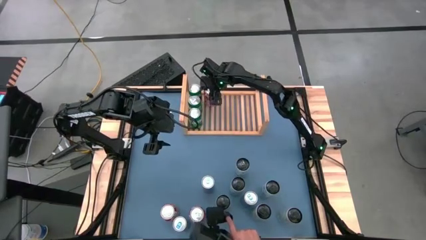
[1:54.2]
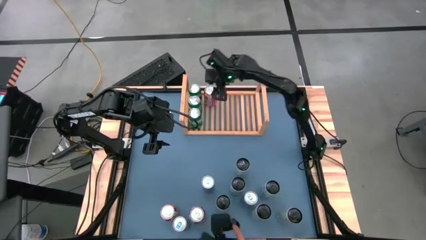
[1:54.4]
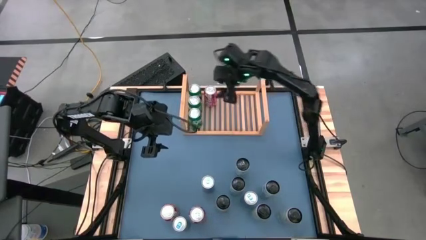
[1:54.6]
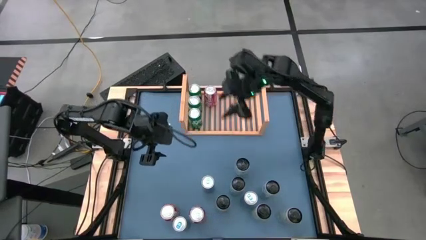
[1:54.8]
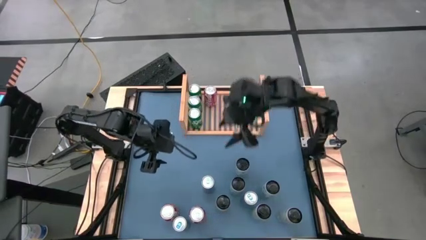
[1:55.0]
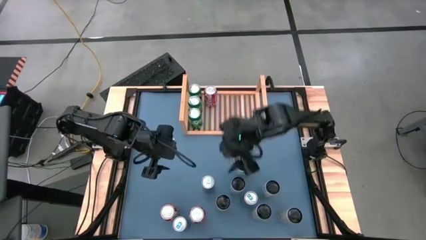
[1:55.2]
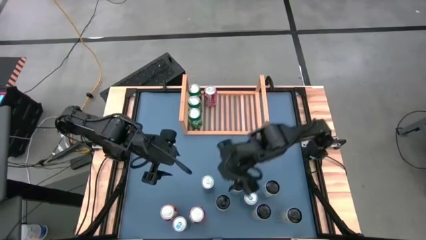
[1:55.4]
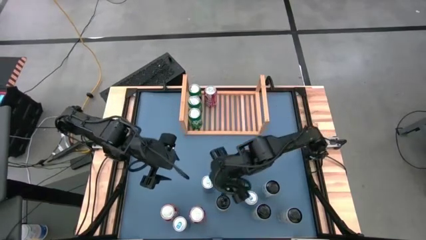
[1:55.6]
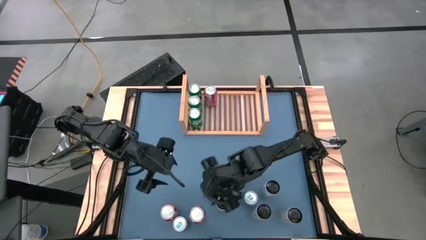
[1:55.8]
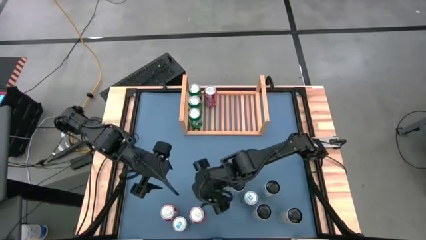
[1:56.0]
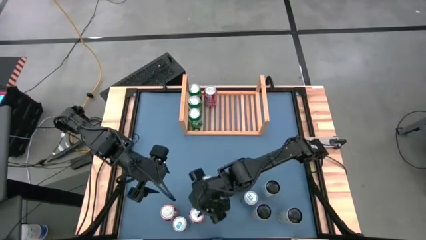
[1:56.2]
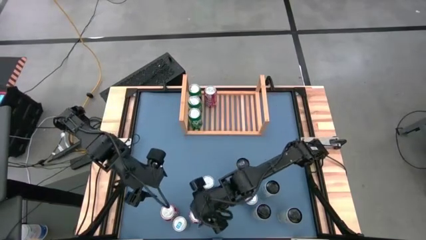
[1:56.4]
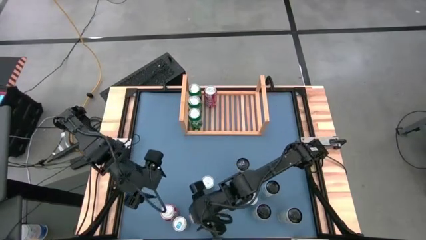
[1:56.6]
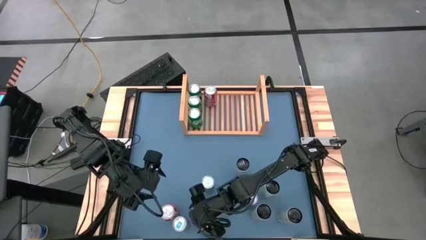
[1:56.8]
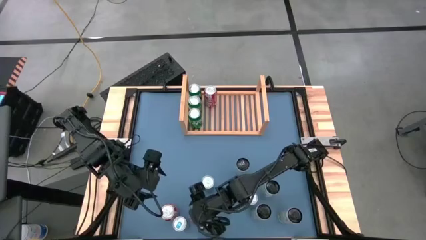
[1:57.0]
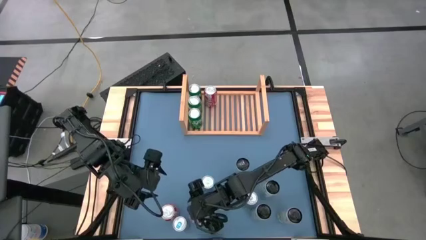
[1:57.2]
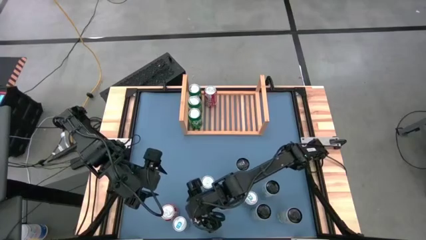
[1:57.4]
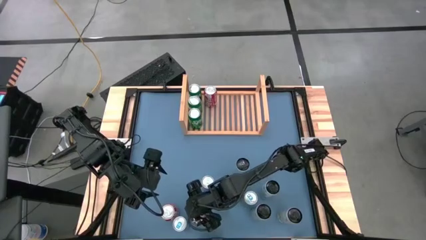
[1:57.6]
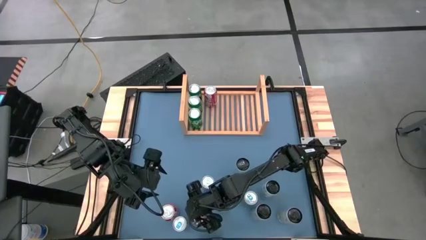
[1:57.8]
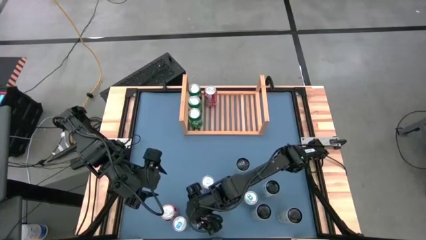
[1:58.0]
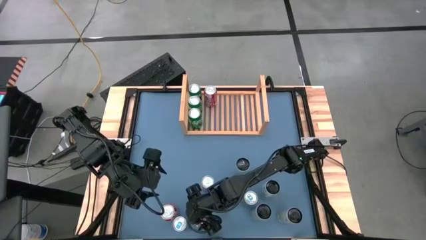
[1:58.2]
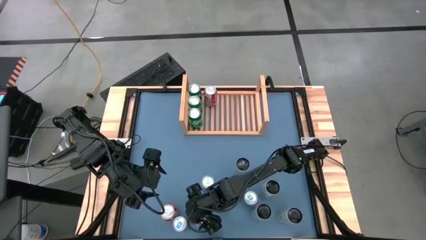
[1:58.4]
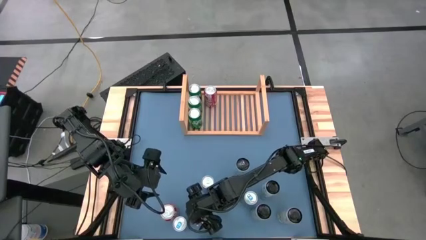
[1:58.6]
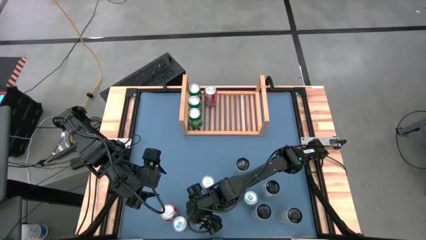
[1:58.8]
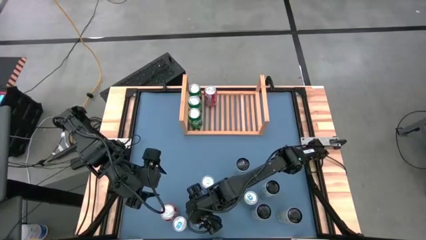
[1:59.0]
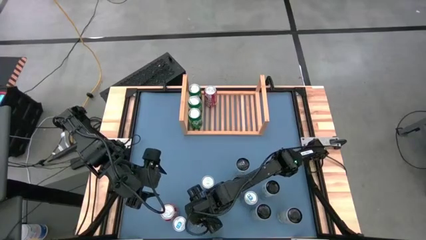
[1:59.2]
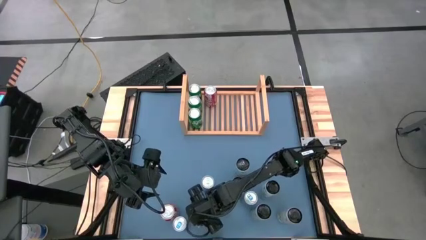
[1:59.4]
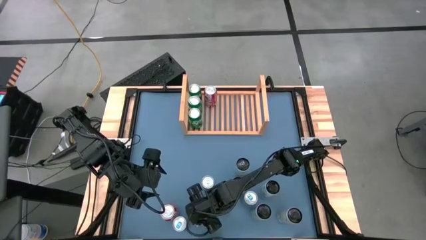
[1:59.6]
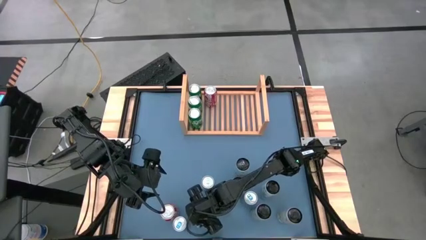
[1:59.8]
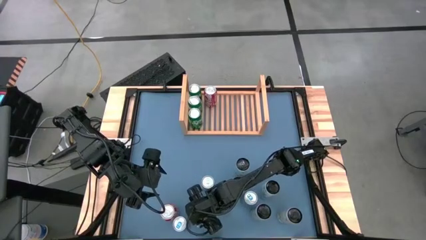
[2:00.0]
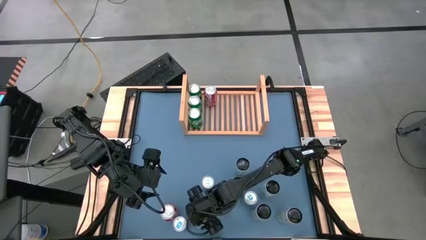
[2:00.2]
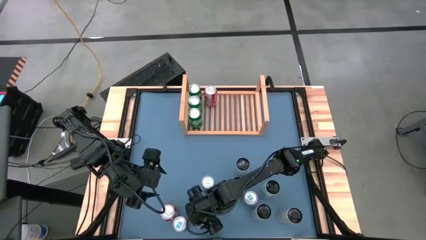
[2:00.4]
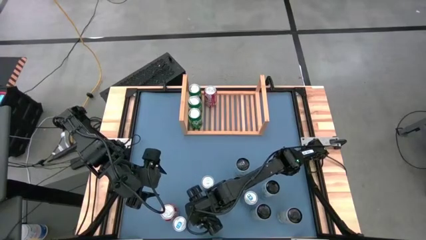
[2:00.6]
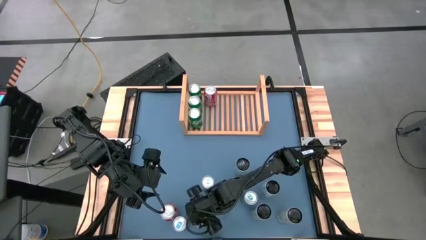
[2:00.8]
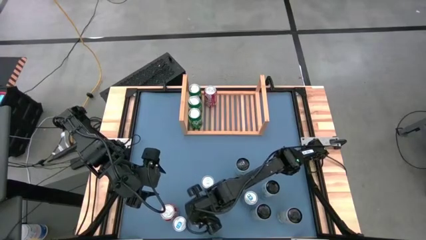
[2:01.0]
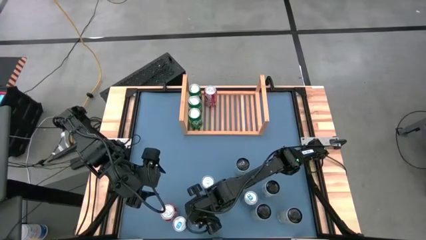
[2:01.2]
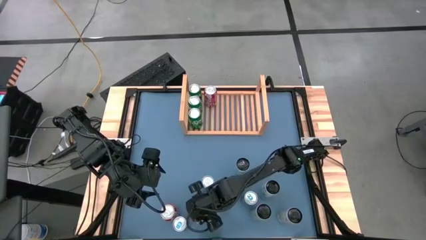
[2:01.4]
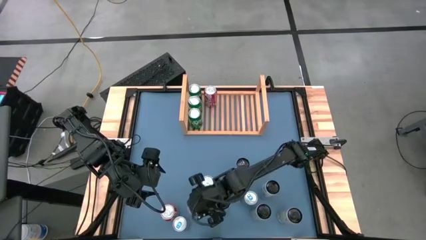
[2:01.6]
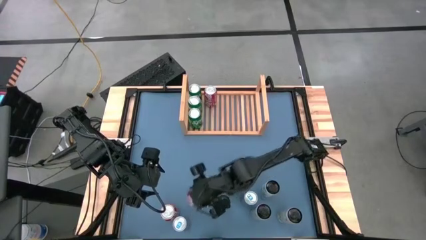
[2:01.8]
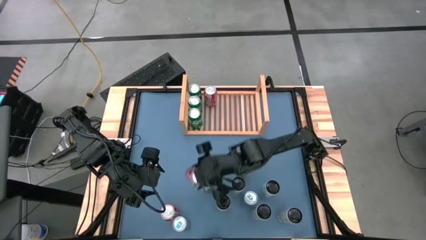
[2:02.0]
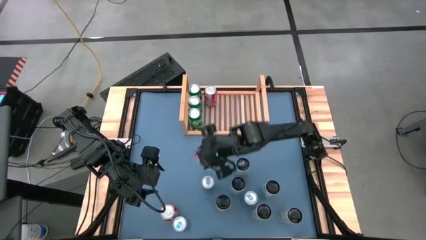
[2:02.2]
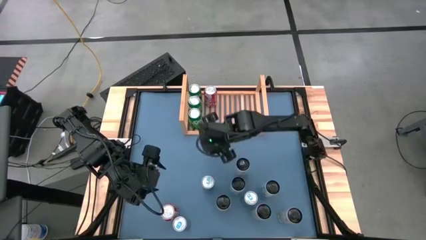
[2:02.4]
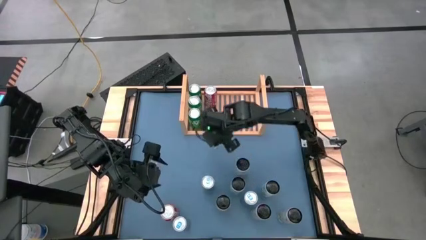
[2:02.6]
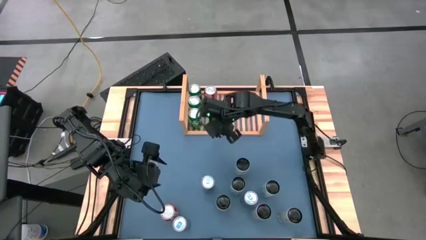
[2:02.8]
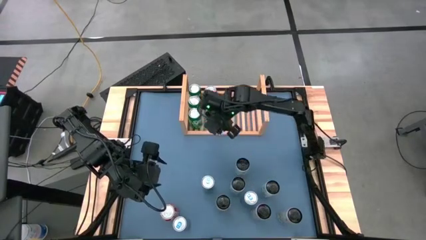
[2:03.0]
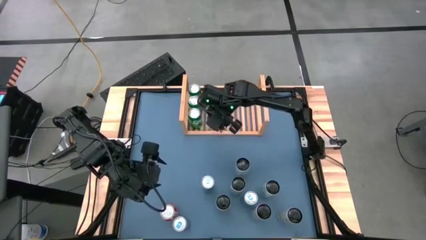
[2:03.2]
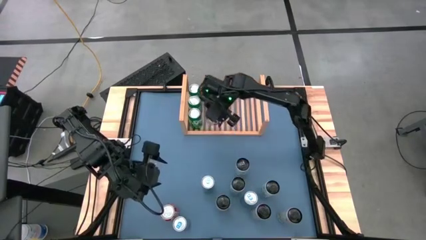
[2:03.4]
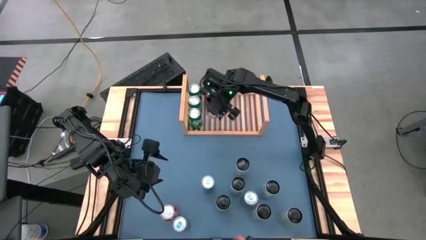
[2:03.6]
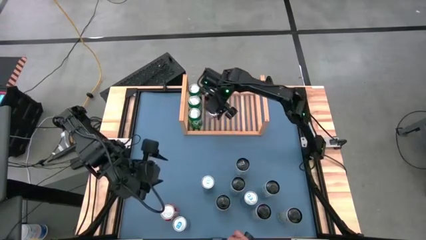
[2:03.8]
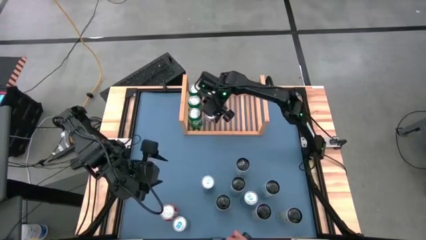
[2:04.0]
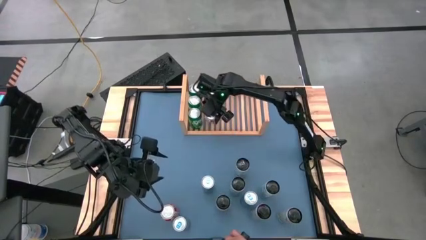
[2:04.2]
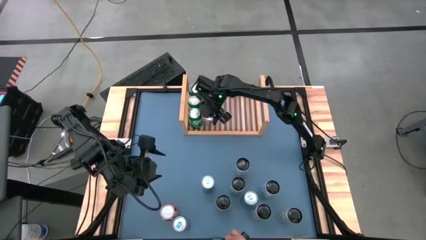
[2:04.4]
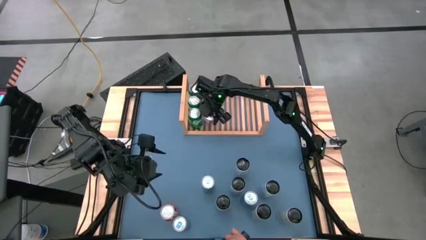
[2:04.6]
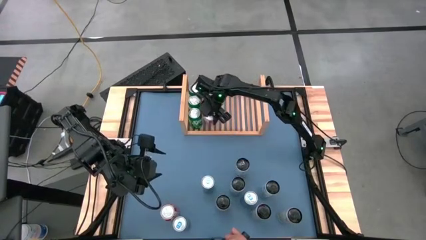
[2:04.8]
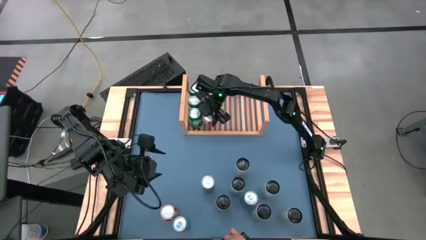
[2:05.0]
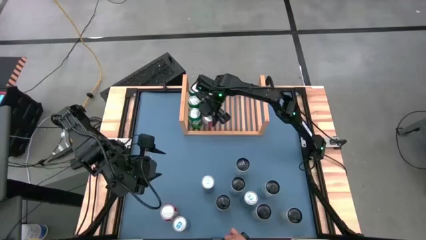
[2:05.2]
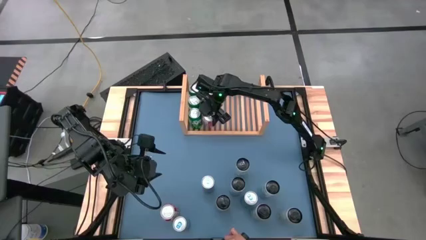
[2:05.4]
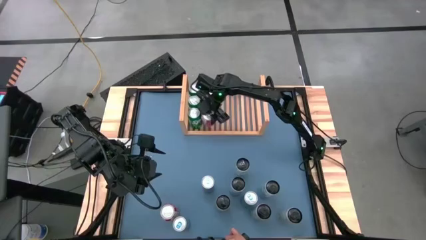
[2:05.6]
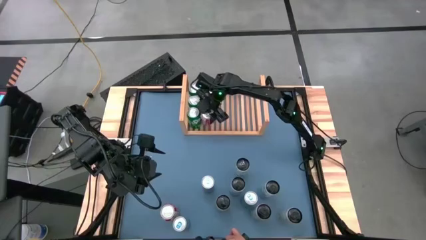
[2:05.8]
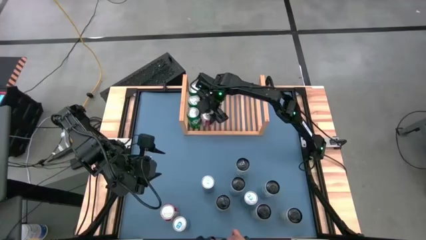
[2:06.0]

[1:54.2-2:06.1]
Task: Place canned beverage on shelf
Put the bottom middle left red soda can aligned with the red soda on the shelf

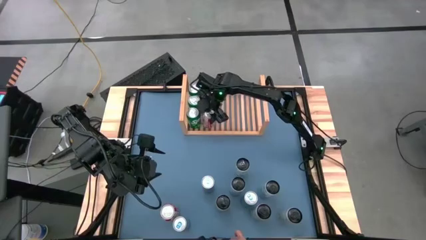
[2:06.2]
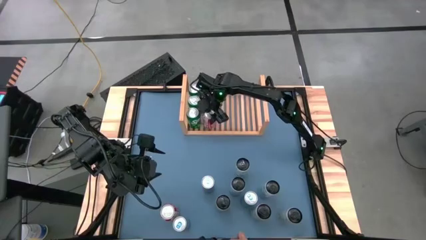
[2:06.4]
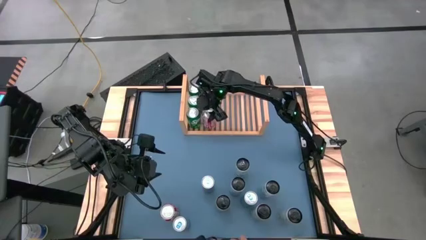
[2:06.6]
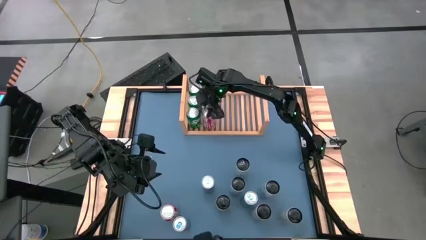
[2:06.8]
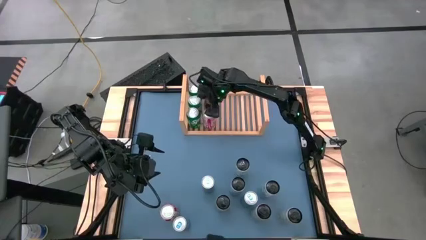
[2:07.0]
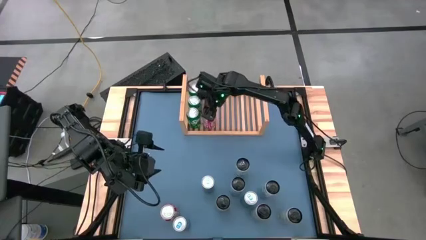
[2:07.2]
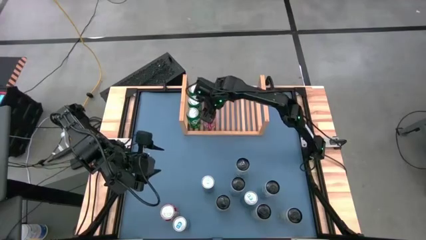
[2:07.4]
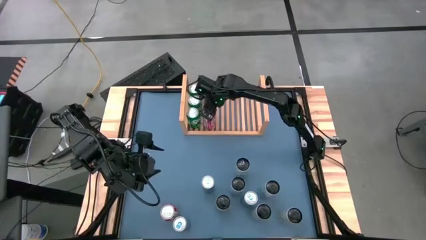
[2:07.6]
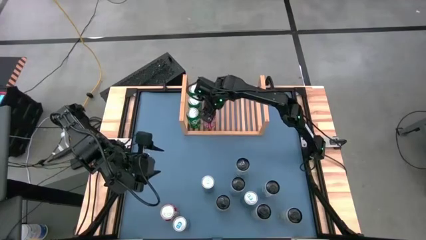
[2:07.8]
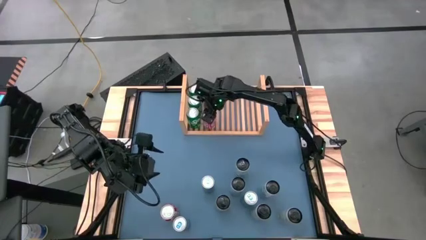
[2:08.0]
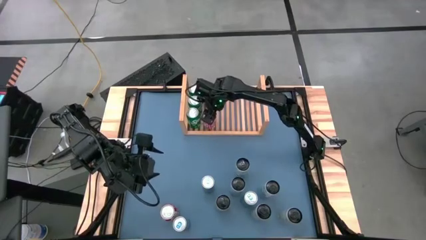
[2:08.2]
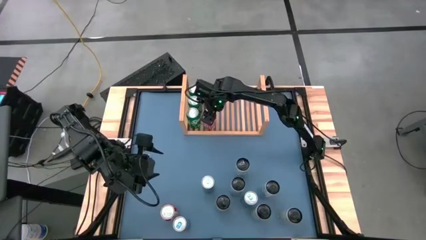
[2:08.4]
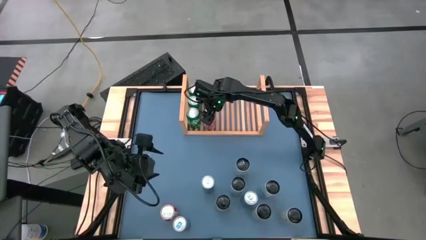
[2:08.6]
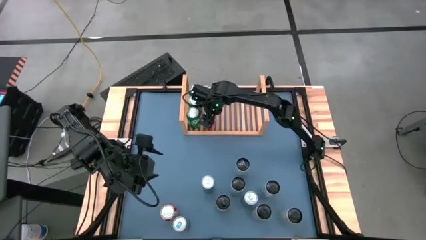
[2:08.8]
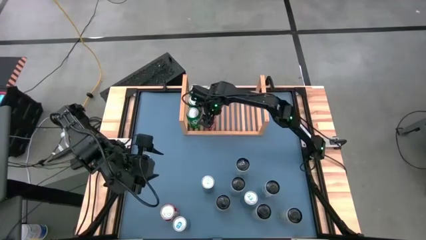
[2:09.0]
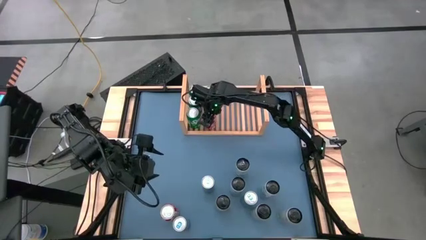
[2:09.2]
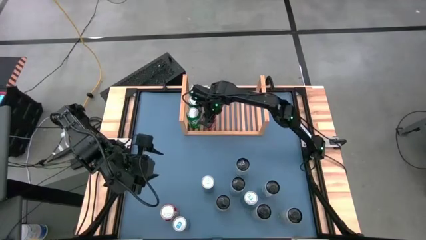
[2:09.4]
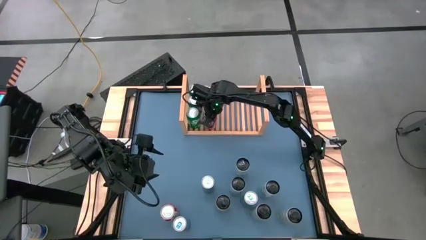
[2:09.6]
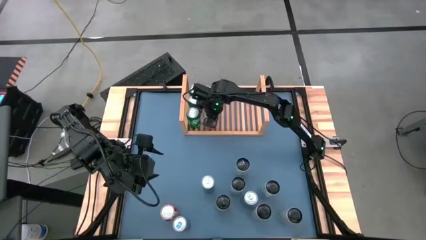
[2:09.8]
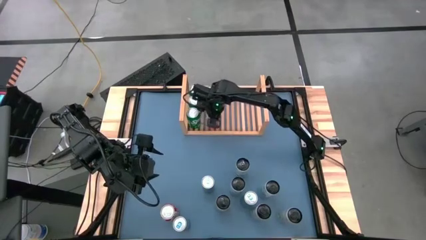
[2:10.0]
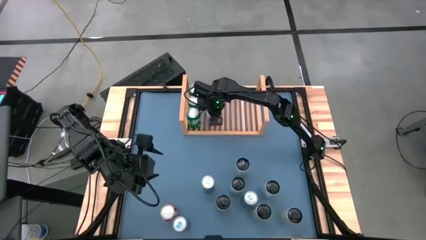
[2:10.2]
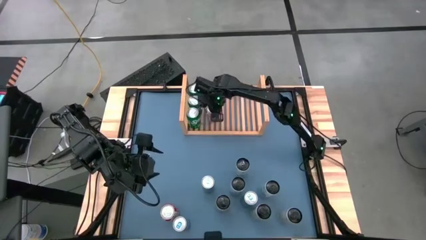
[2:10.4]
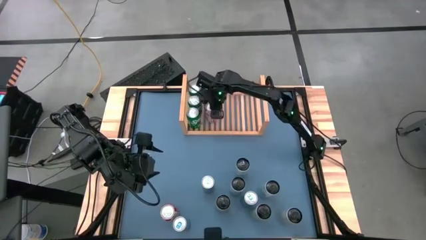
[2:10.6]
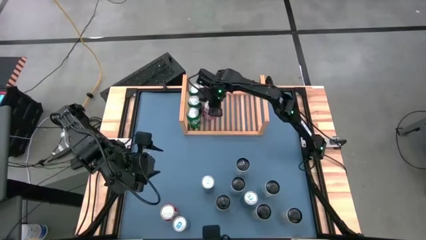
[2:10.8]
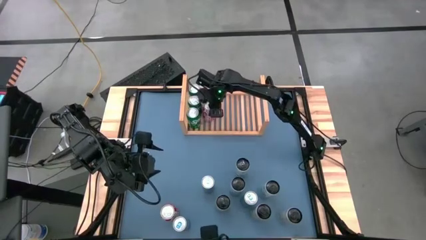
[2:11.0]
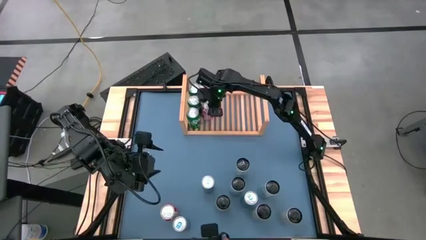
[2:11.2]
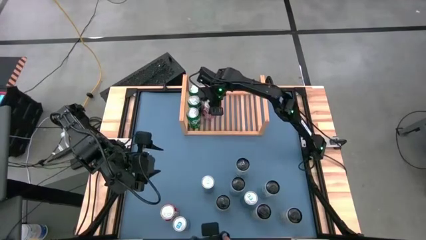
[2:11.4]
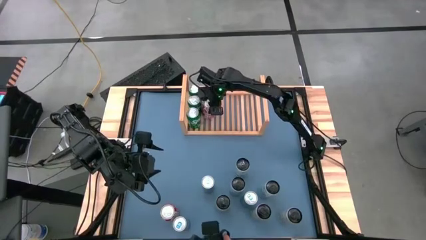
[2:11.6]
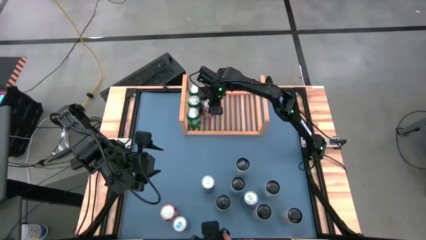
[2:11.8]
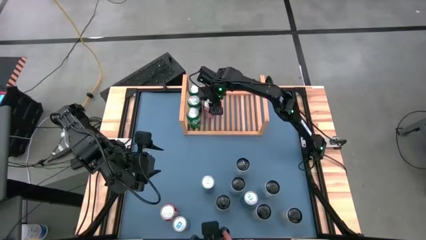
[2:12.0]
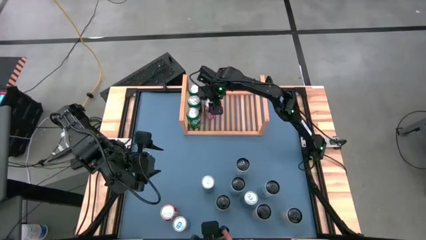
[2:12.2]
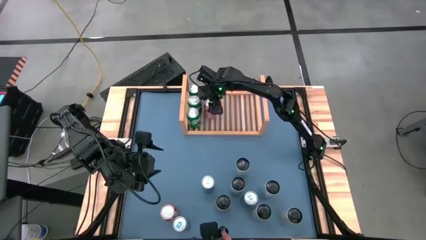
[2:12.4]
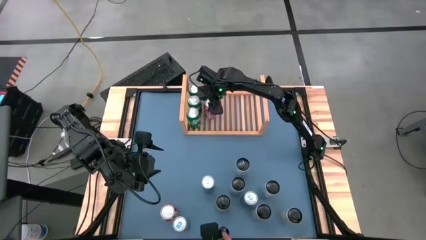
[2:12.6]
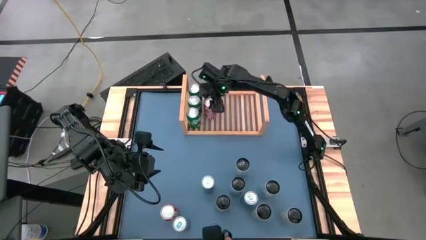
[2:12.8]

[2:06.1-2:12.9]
Adjust the red soda
